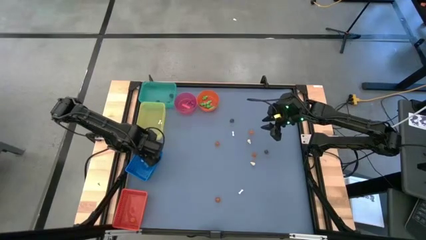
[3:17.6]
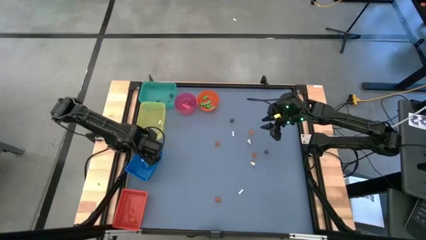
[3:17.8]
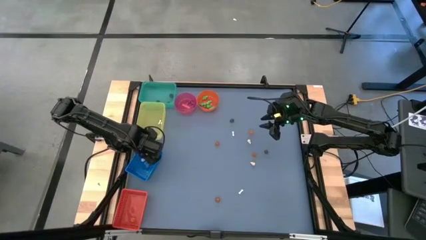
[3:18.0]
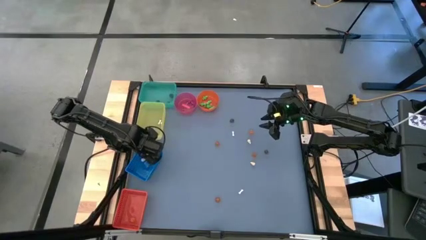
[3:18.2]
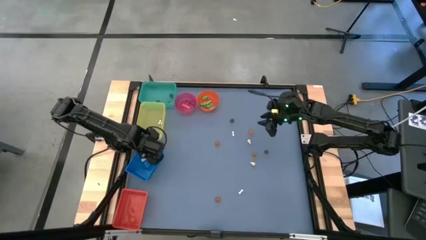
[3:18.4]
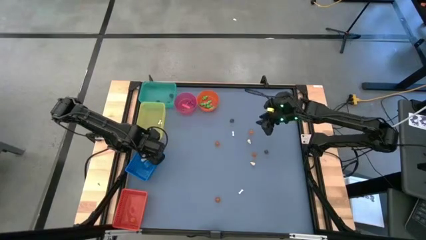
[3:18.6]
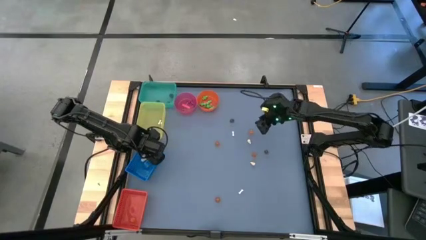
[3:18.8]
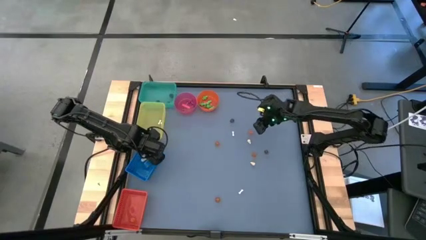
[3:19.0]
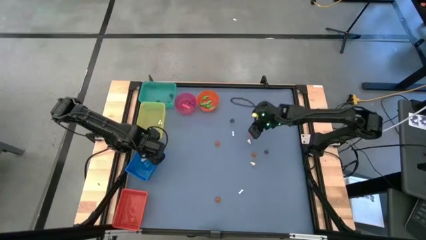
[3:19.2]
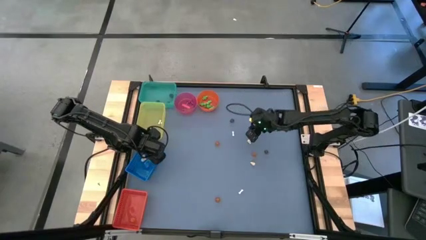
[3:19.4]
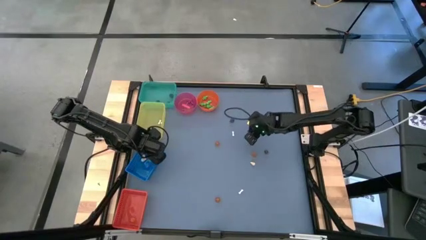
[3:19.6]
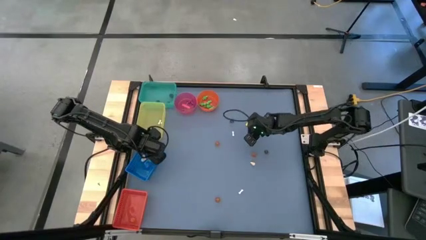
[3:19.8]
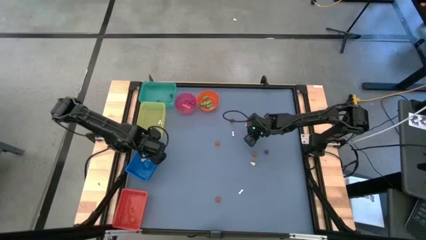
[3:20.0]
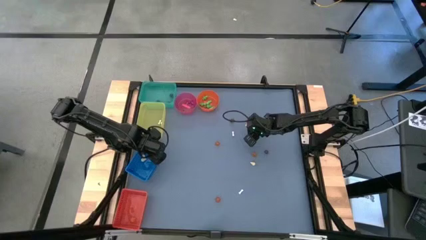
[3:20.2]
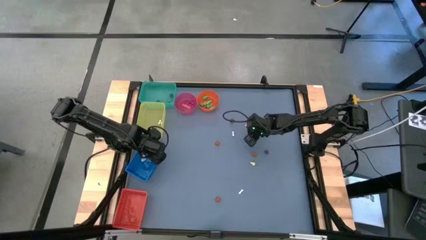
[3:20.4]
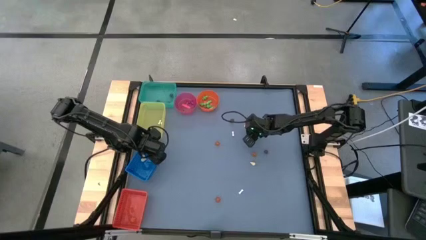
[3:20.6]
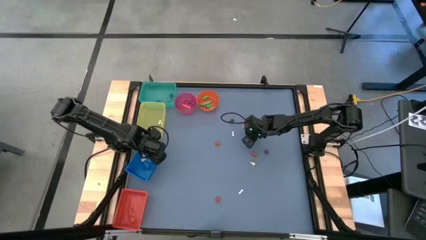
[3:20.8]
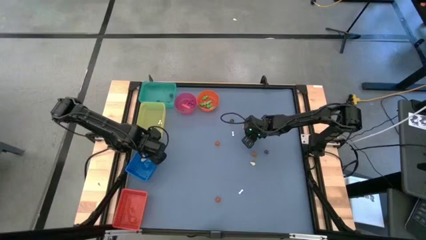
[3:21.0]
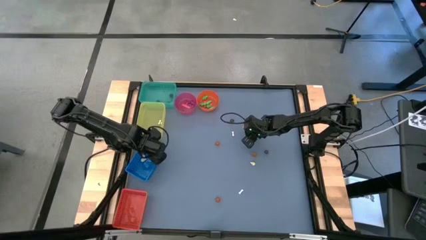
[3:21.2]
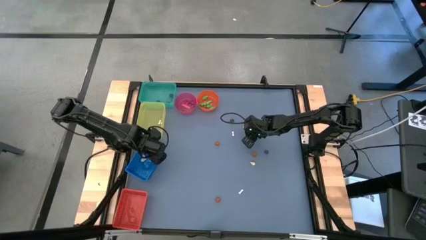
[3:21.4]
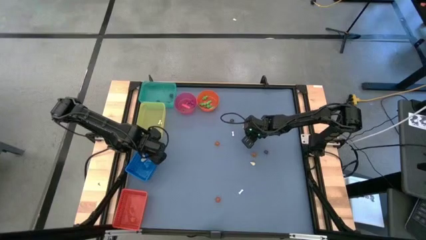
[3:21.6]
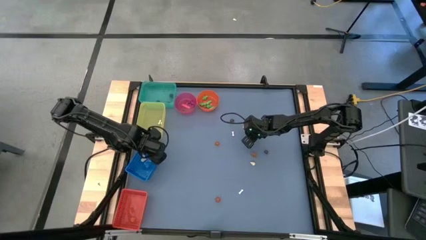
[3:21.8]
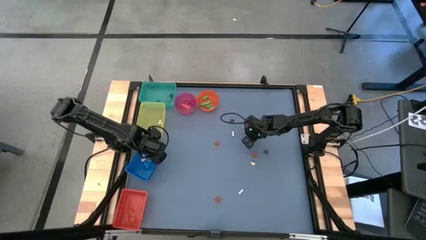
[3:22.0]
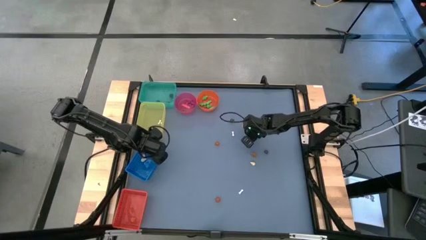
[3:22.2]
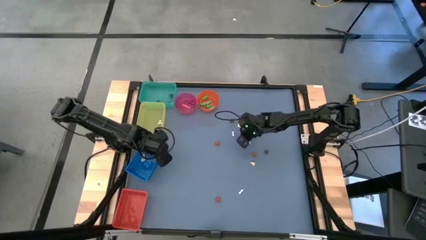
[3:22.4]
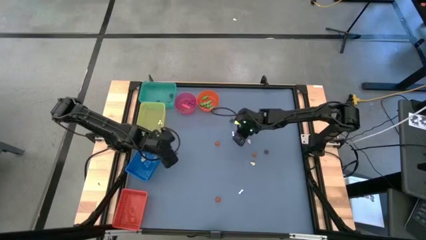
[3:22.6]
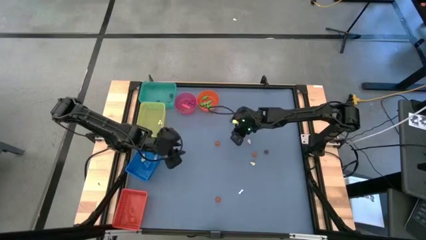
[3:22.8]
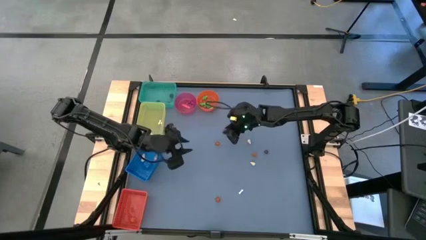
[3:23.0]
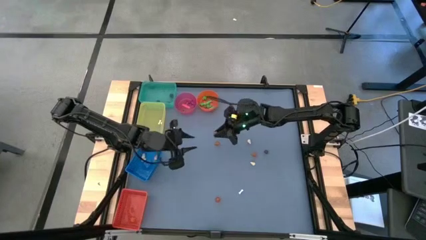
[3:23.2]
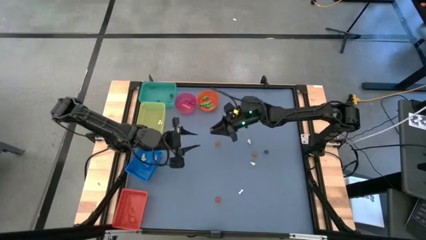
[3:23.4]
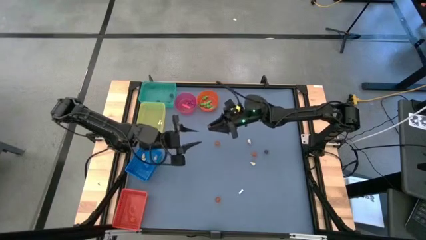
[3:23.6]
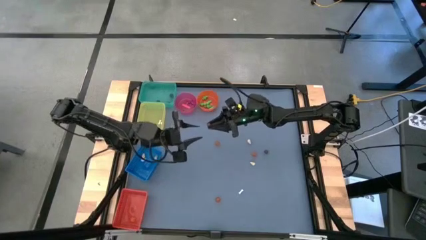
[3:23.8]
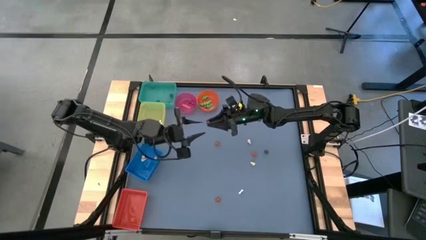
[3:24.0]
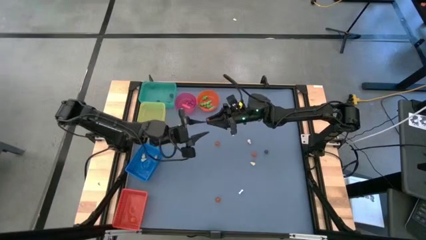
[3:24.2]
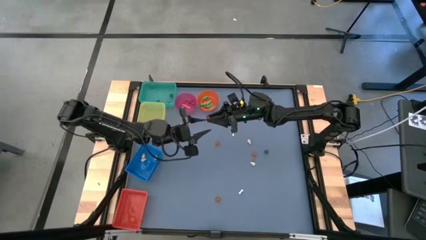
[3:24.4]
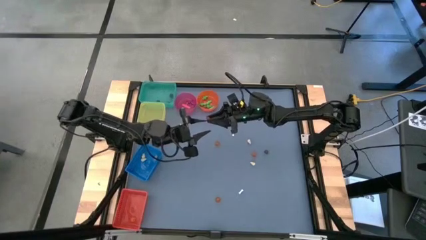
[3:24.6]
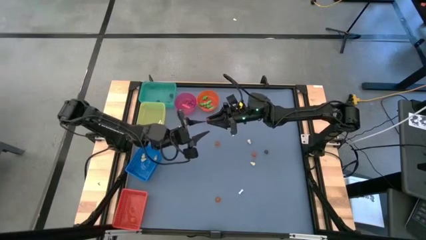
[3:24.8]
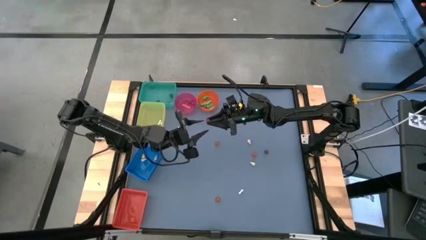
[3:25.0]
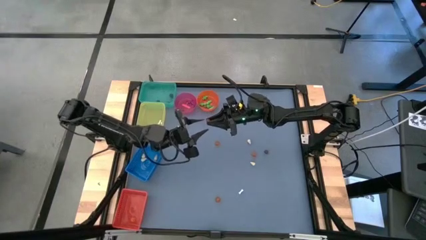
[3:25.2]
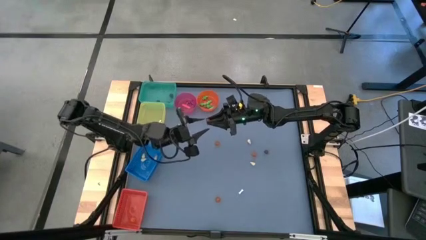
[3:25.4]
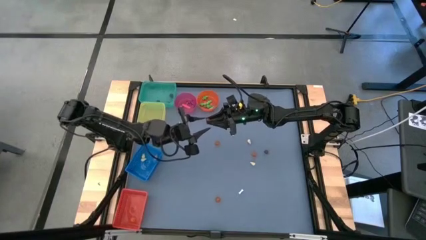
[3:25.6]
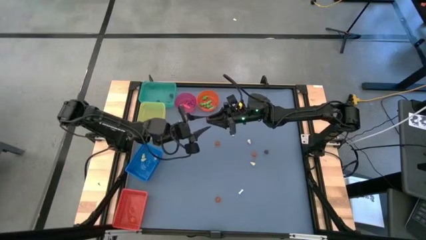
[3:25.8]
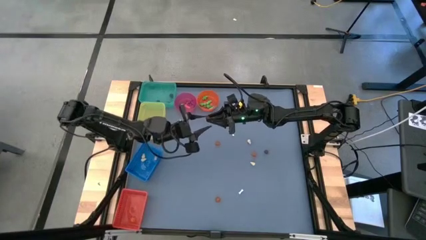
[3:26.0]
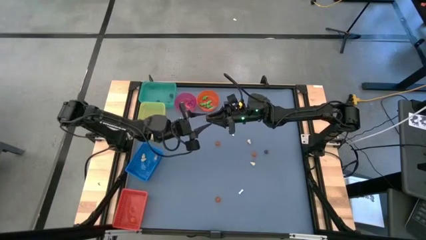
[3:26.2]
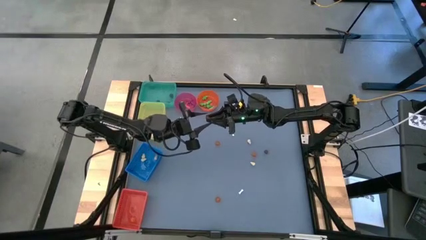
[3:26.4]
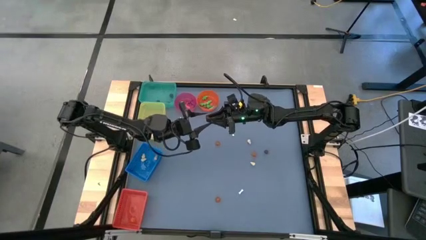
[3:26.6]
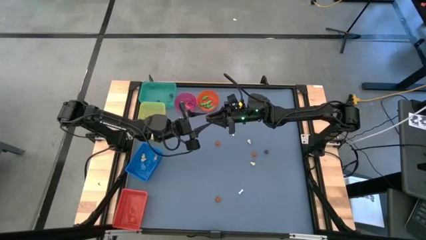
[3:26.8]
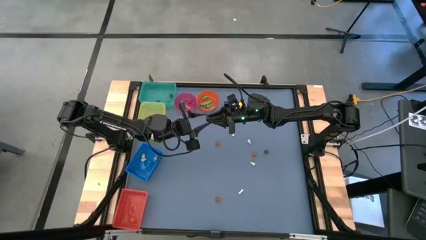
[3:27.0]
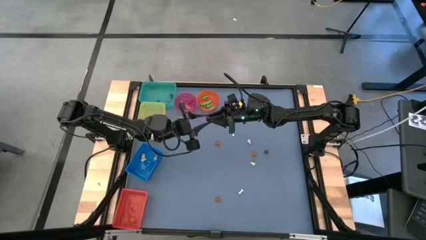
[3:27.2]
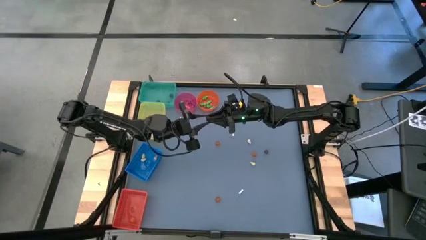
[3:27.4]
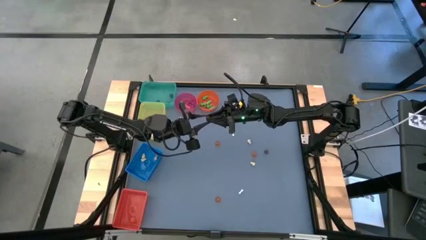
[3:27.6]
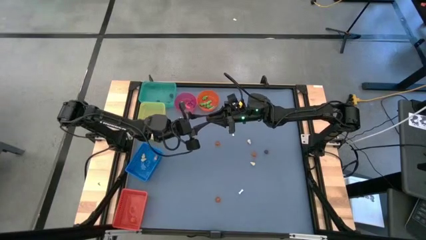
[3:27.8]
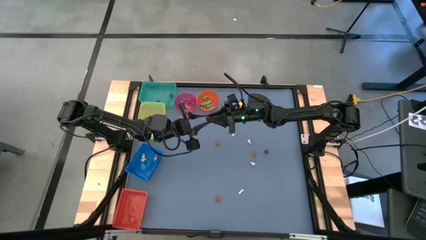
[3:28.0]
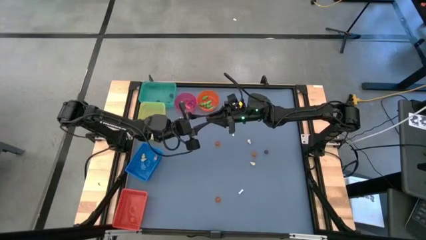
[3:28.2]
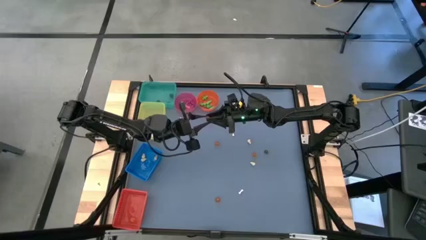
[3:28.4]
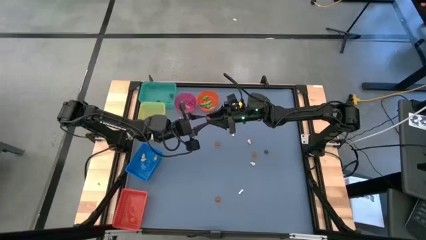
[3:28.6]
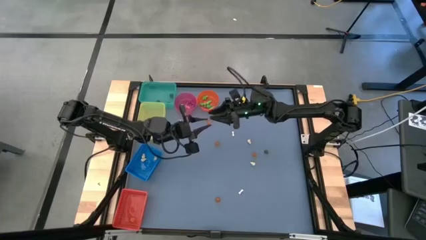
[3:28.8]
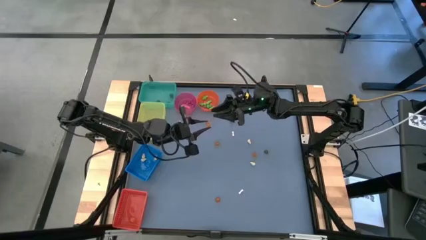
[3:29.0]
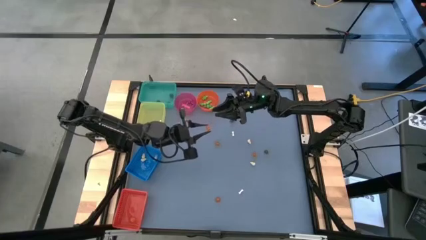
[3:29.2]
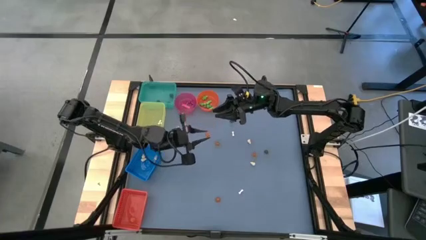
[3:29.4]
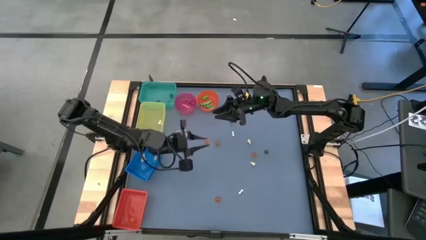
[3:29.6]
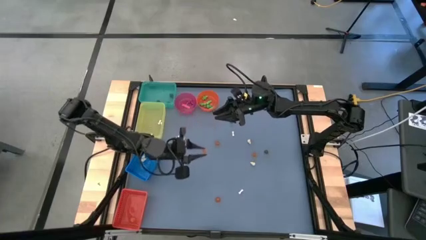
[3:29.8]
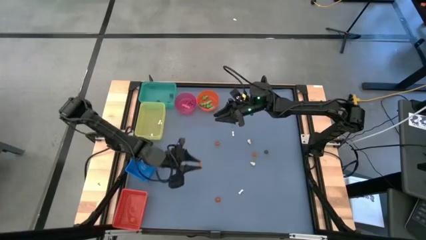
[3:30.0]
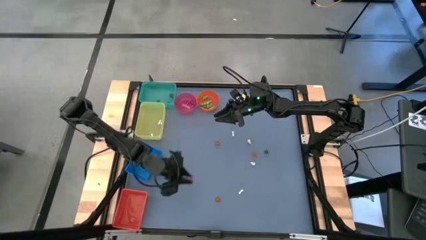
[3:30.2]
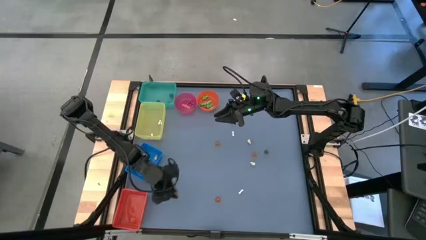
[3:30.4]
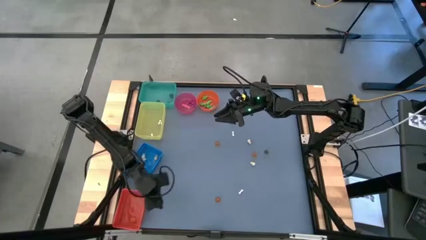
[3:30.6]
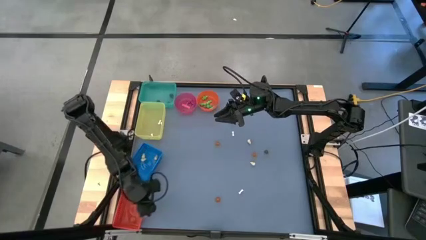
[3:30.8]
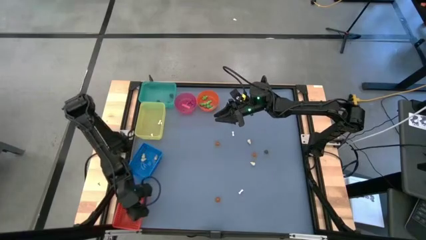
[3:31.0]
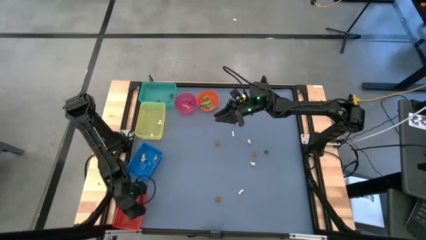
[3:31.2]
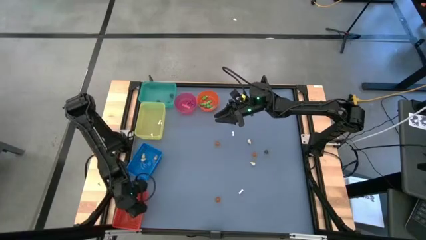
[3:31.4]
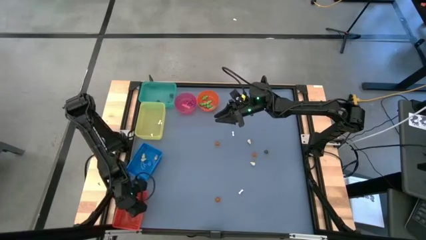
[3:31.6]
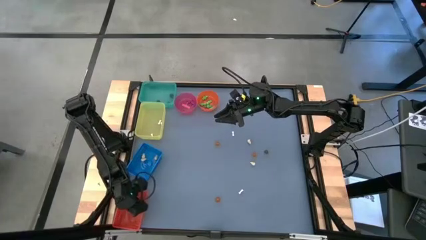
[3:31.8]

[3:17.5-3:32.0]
Task: Sort Halloween decoration
Put the orange pumpkin toy into the red bin
